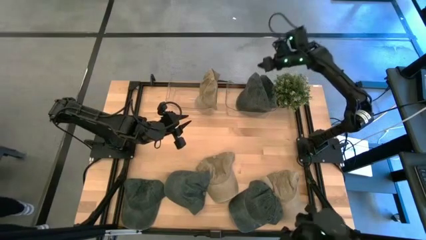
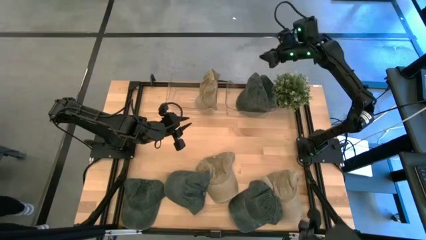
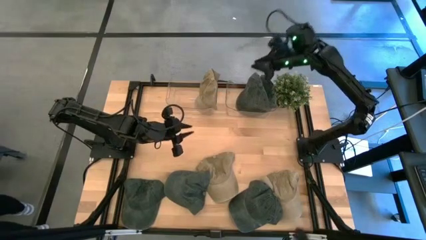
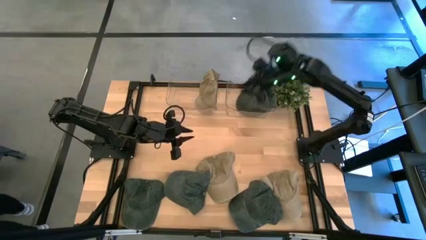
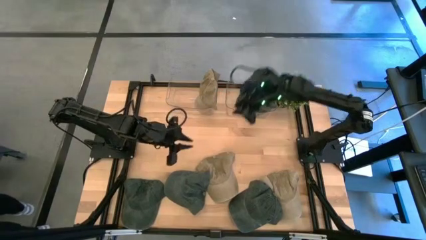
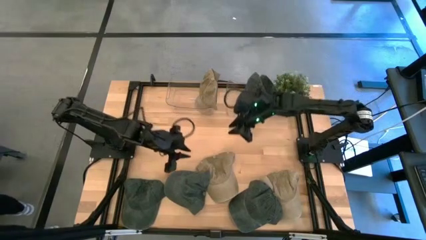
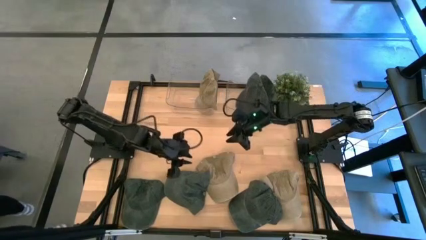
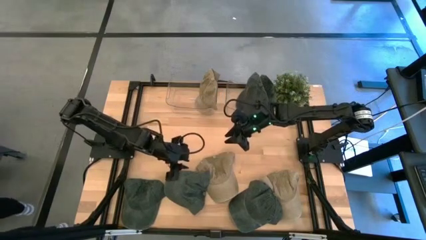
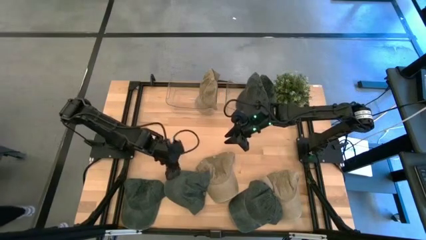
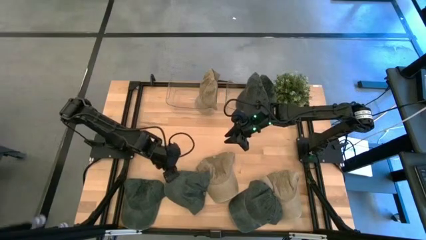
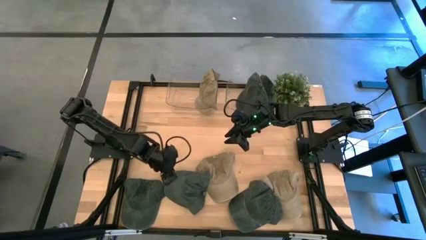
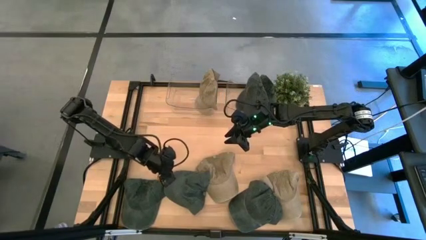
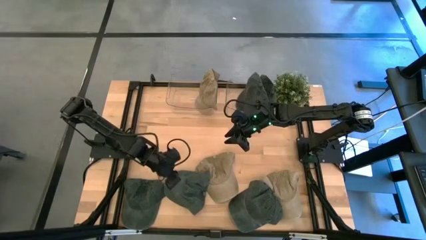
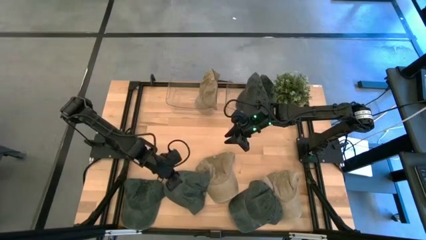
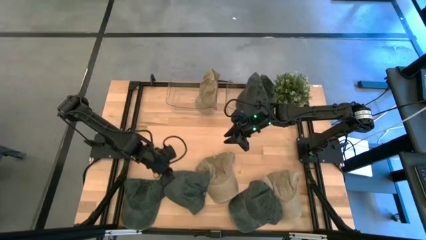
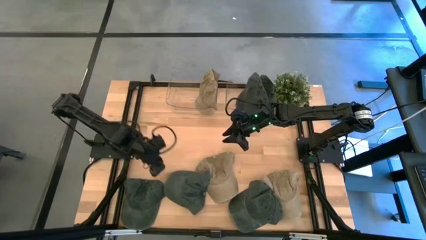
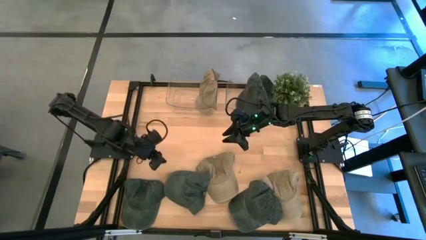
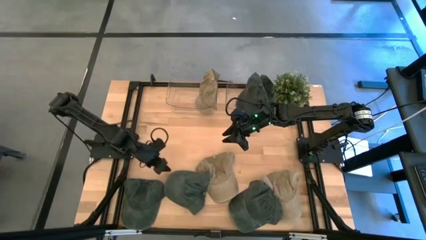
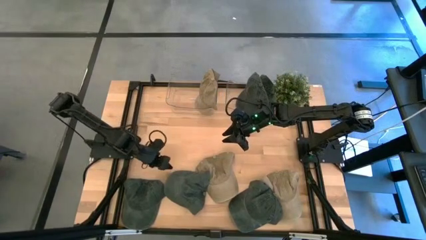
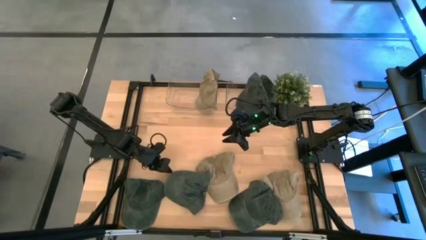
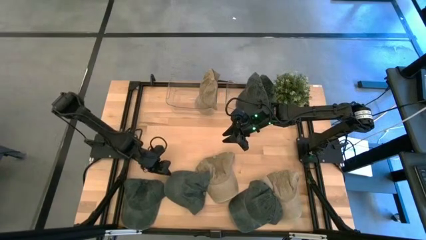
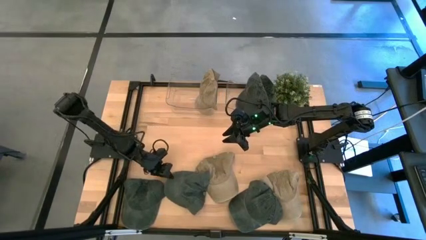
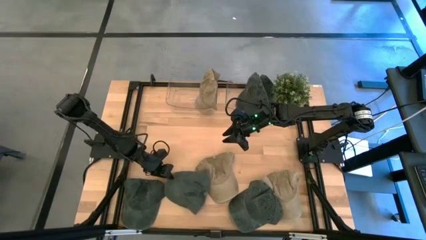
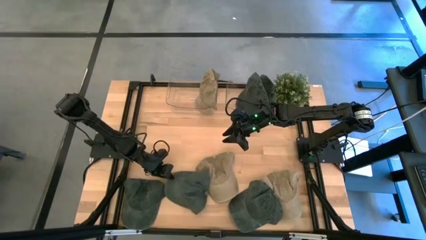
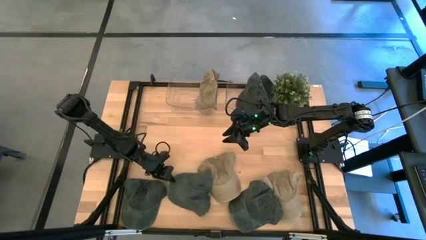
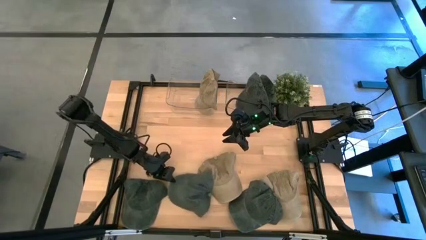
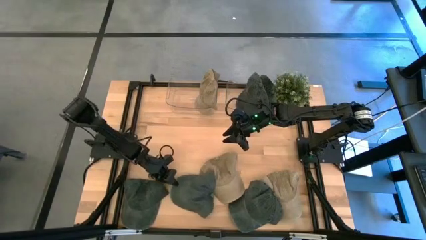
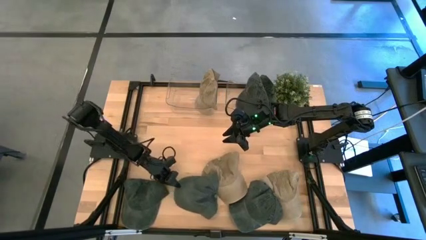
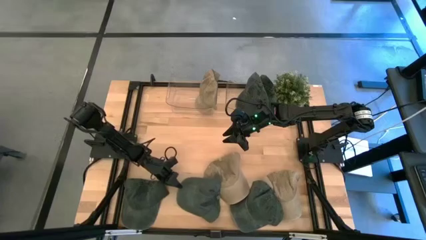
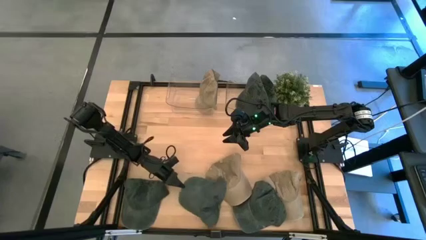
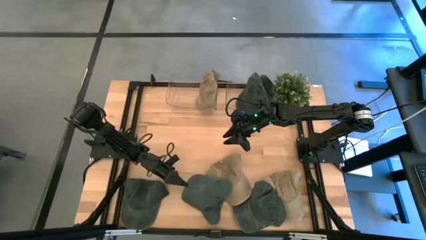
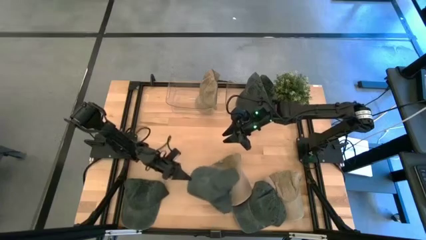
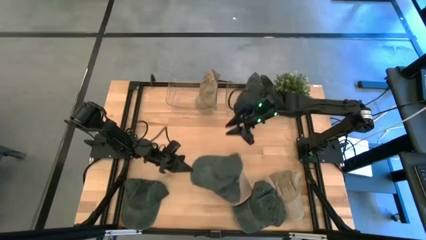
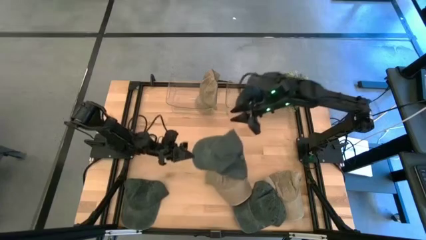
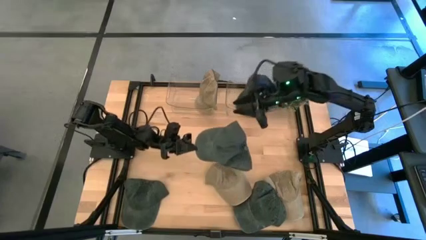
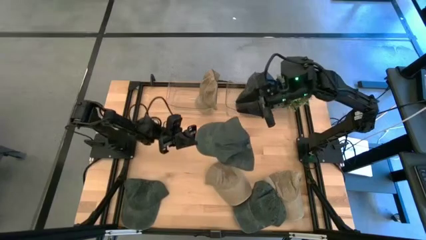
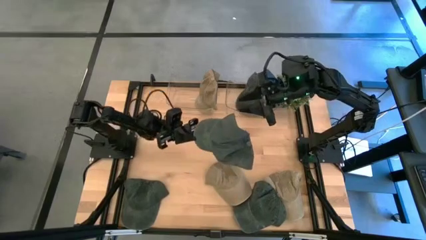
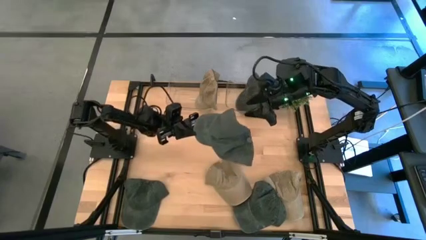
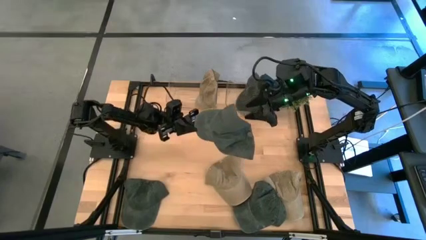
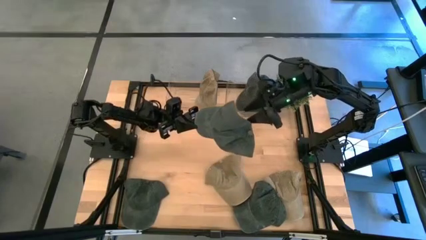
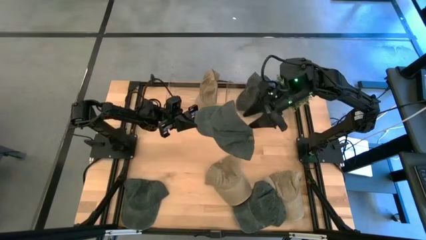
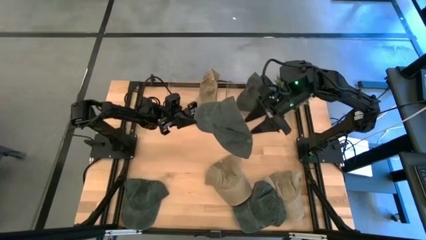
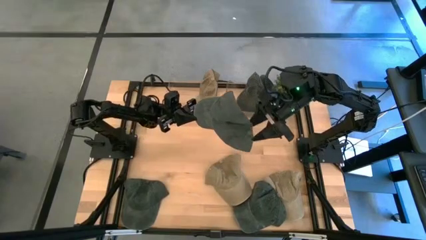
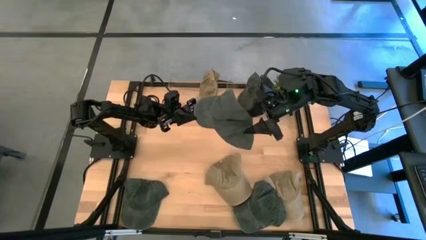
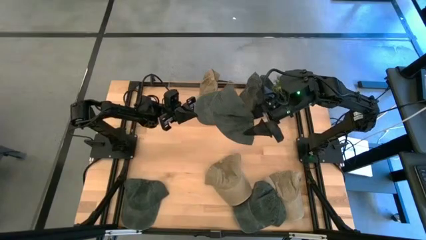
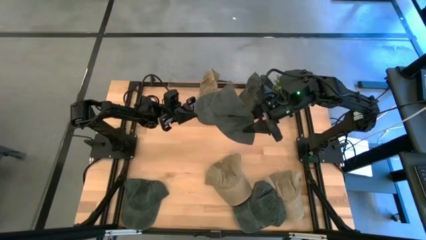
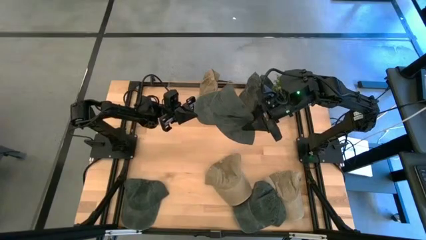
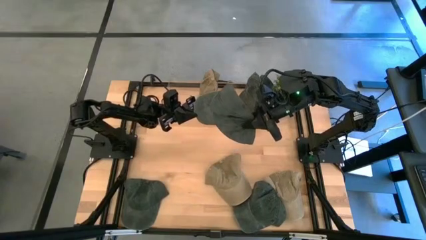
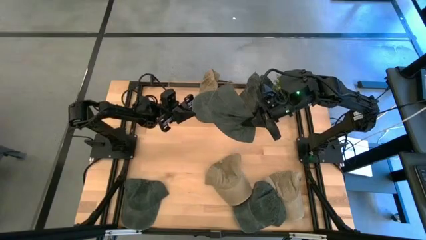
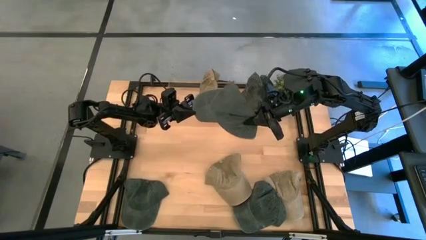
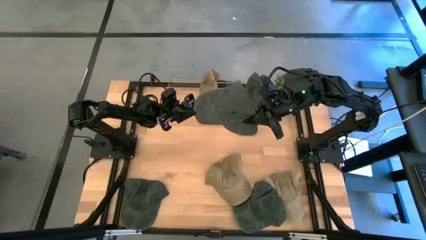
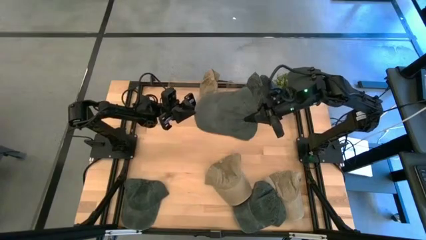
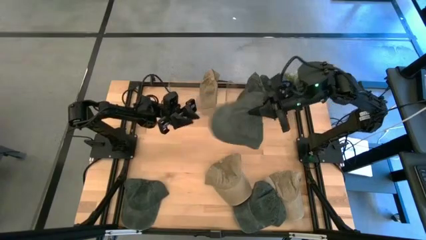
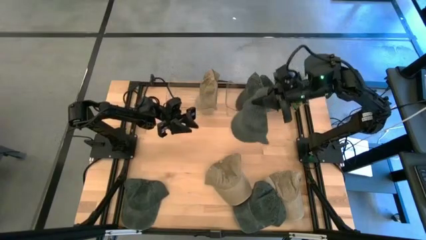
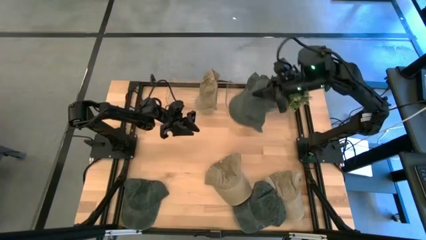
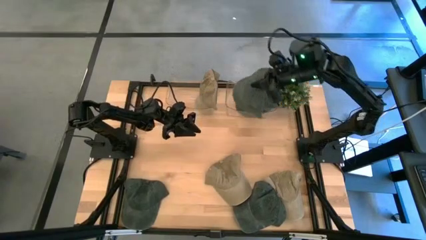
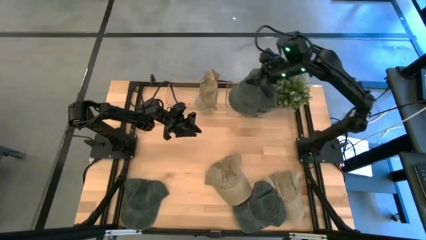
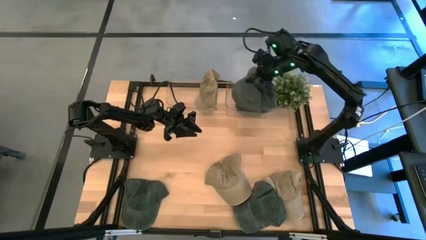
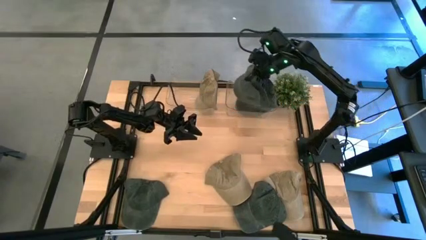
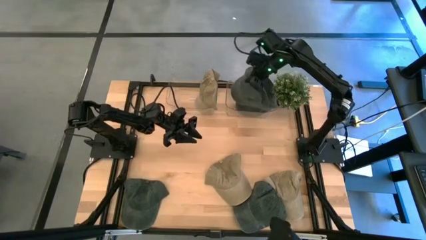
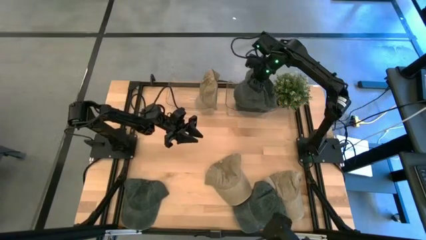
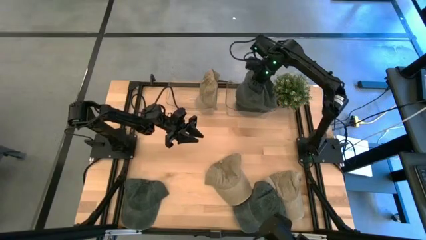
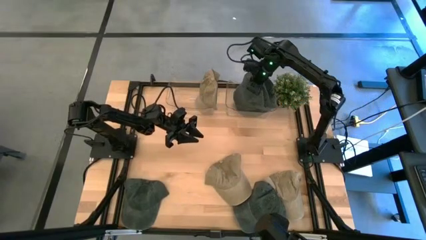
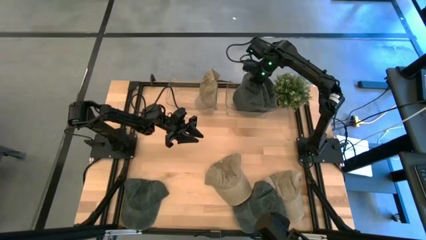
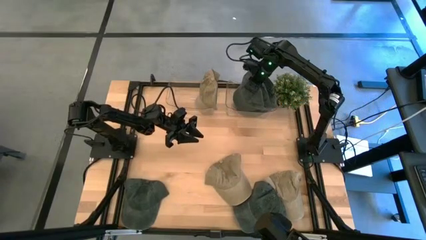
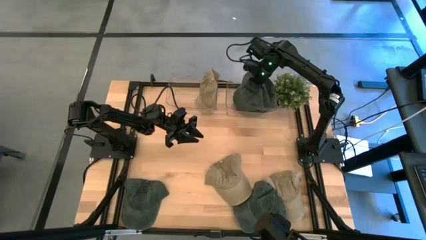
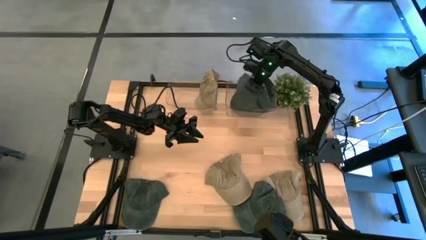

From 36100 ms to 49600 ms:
Task: Pick & Place hat
Put the black cap into the right transparent bin
